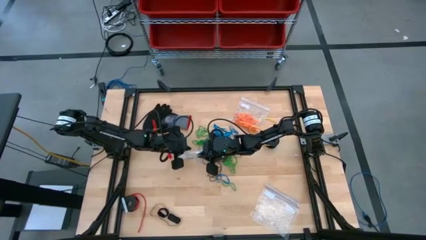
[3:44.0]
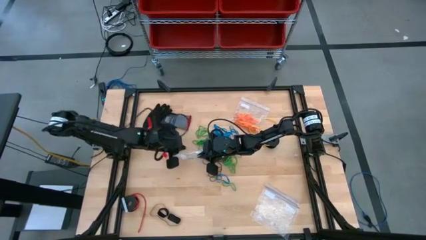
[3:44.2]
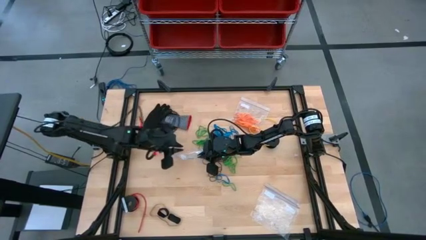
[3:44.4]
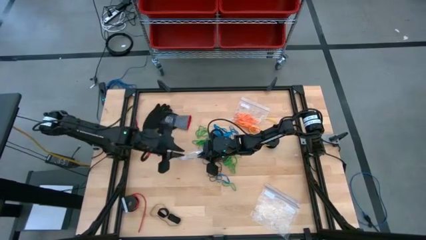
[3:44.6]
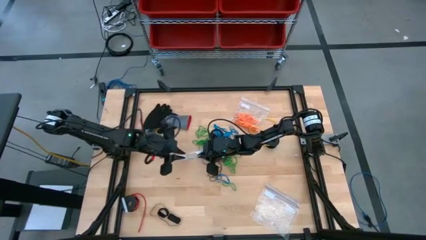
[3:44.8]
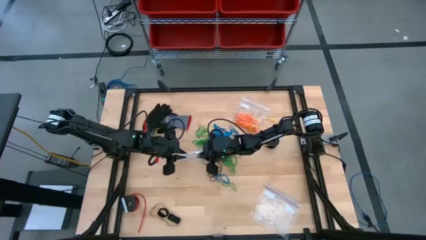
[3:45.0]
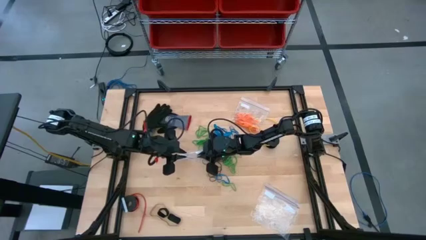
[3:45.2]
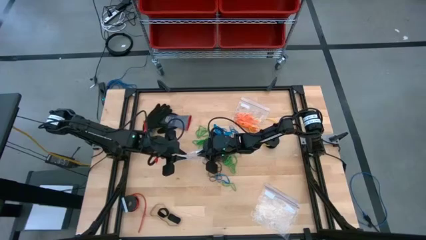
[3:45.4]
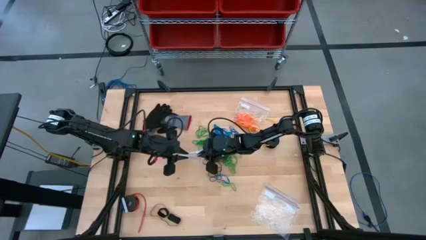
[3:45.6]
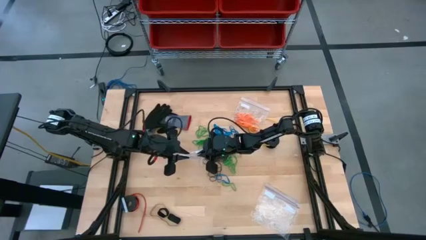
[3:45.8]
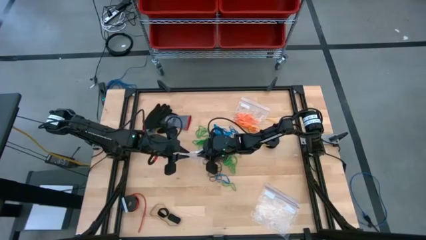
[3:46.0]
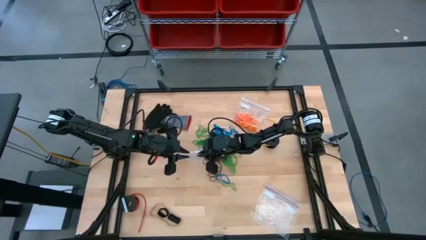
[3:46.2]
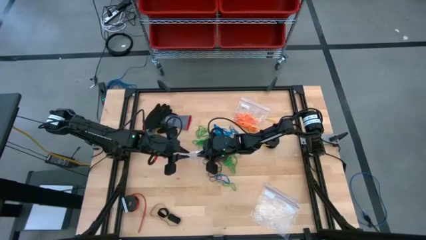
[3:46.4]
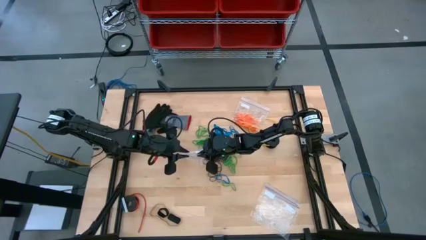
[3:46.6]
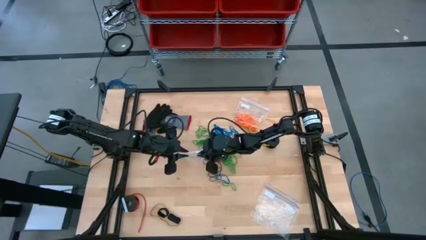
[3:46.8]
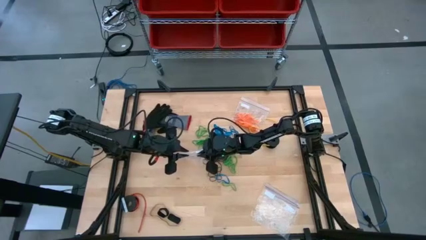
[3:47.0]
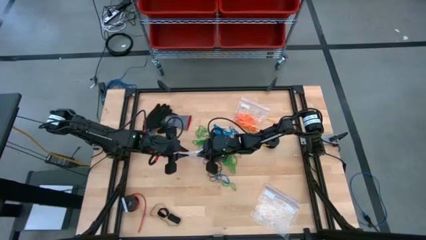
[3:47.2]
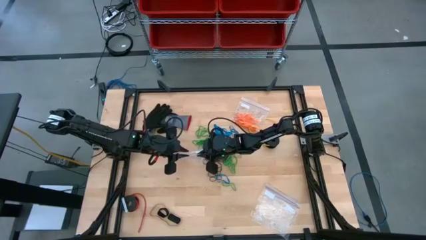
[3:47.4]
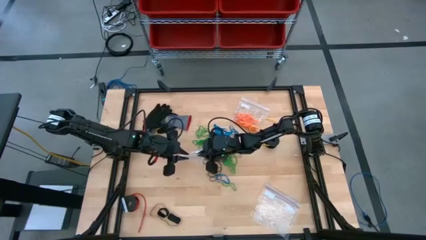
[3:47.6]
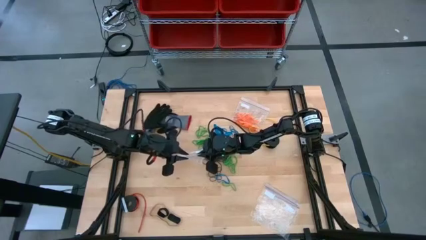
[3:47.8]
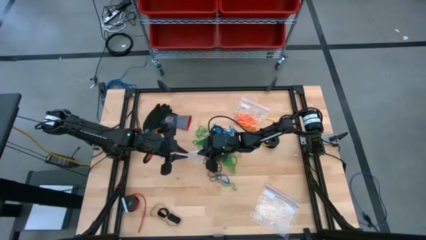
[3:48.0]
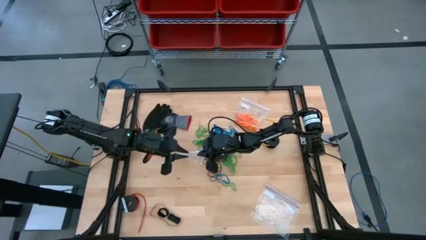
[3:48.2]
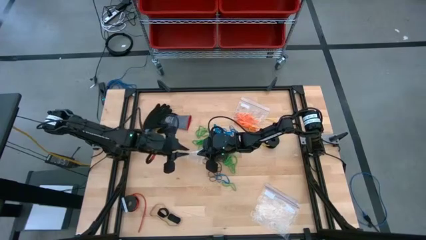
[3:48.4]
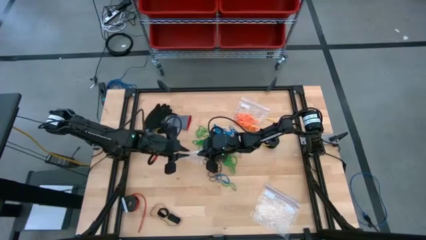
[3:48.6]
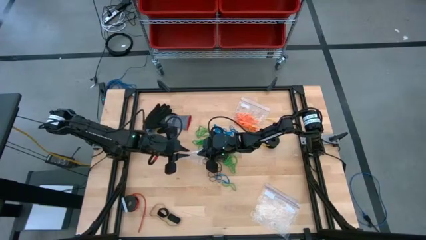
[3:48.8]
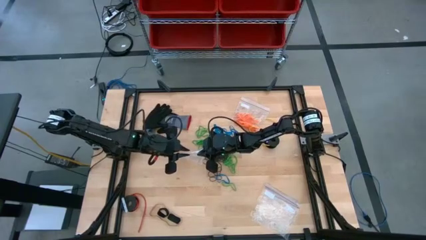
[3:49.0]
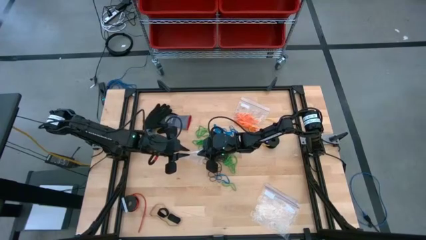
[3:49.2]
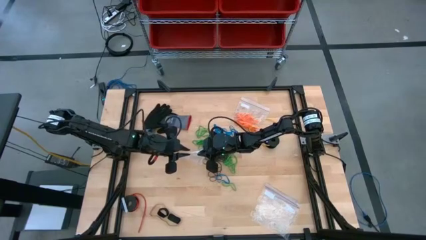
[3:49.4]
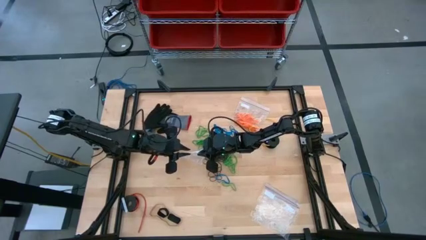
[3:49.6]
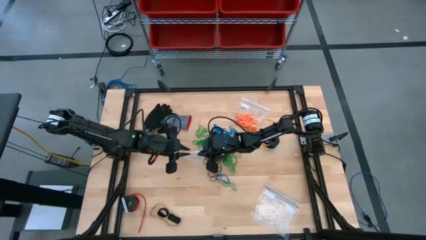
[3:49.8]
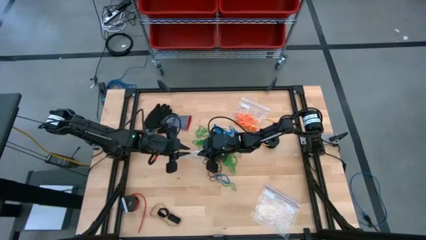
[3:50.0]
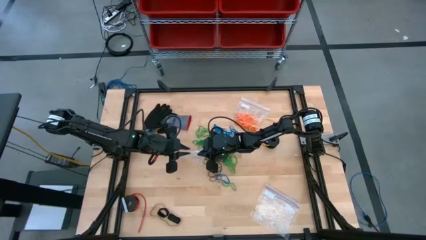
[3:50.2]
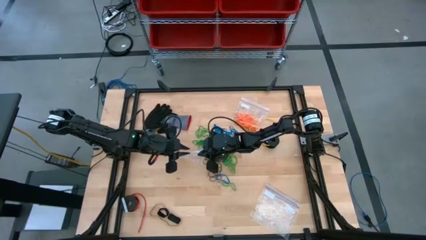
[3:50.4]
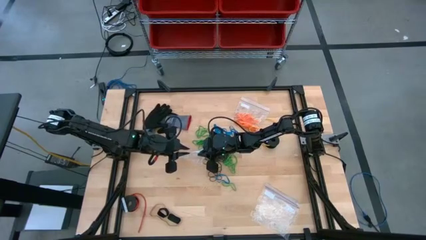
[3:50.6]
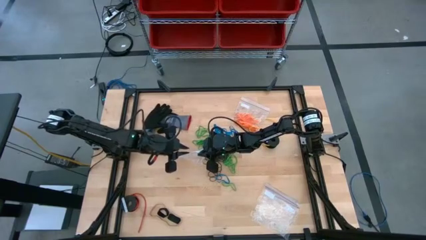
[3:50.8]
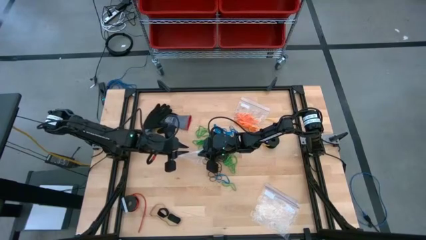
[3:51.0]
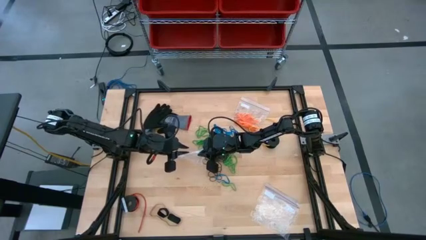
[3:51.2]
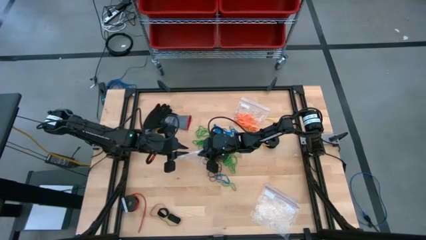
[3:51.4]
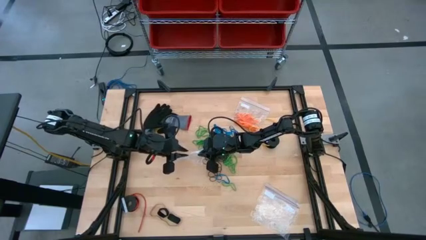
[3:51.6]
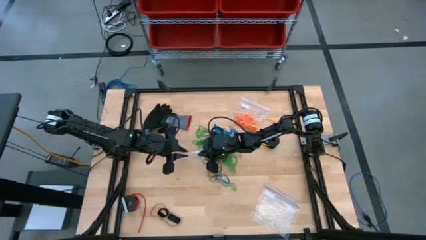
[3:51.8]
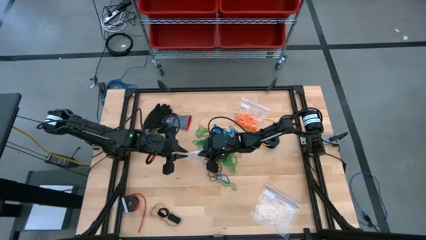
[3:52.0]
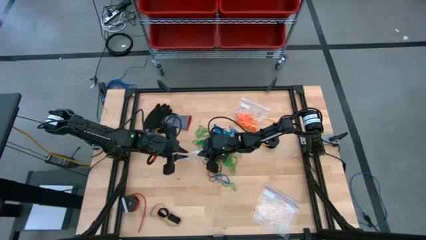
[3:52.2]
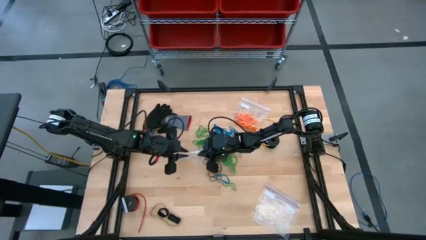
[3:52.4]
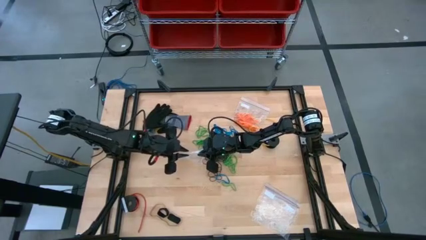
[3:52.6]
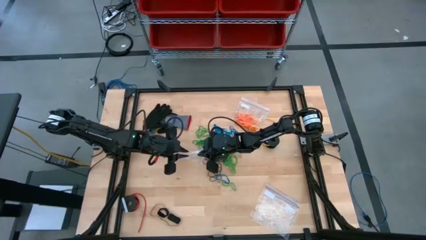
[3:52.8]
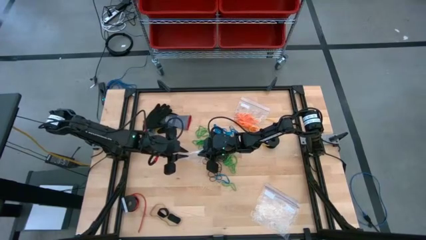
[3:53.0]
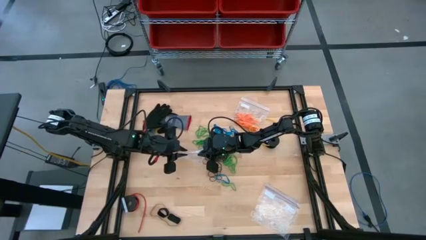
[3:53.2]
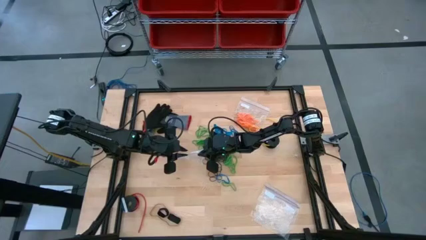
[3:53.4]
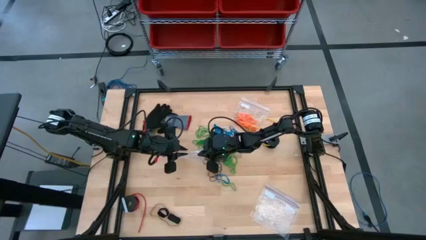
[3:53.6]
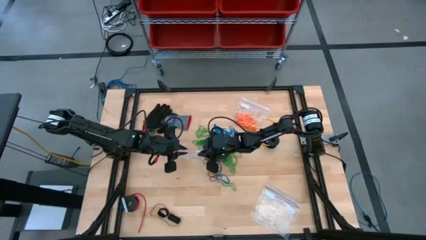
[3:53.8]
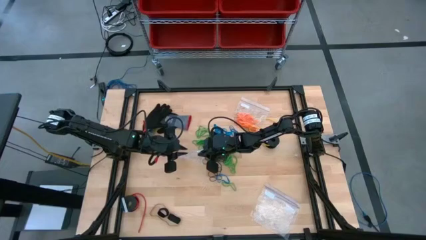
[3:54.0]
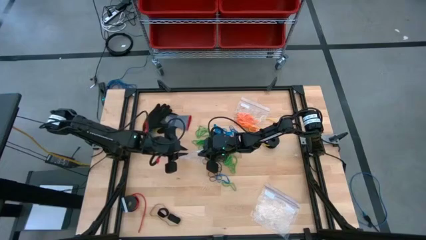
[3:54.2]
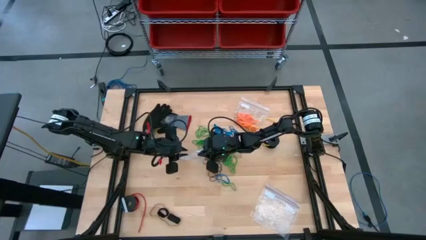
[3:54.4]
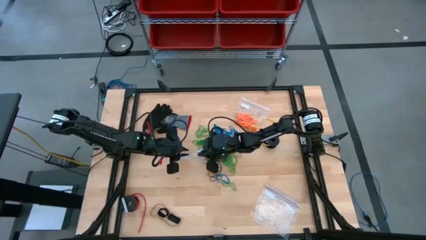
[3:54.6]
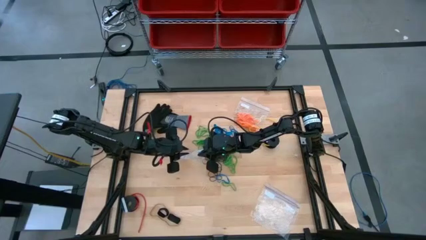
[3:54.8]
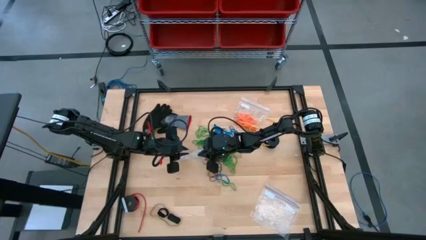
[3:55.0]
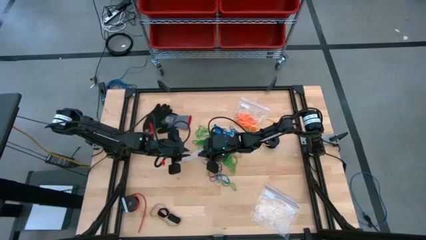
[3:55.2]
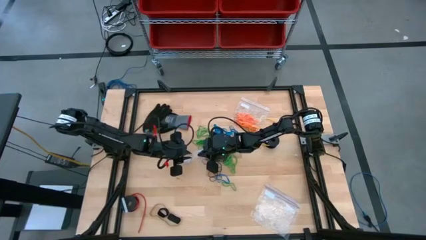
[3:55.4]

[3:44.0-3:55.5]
Task: Sort rubber bands
Open the transparent zip bag

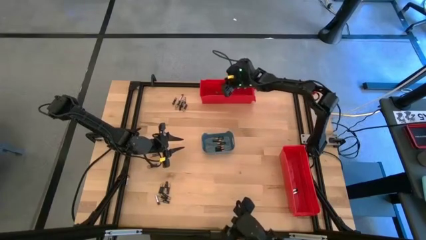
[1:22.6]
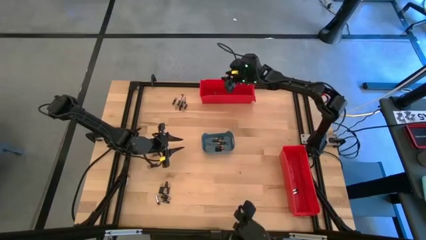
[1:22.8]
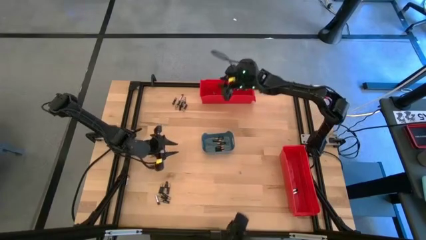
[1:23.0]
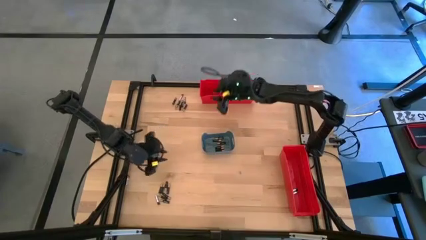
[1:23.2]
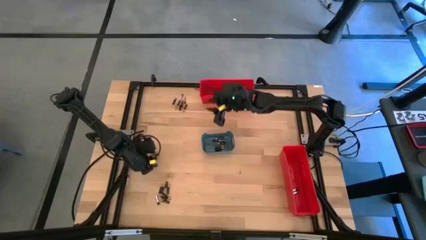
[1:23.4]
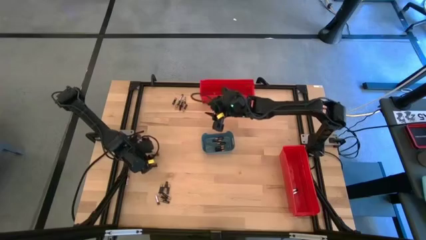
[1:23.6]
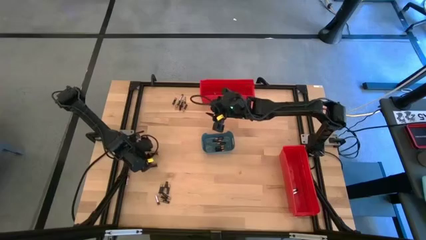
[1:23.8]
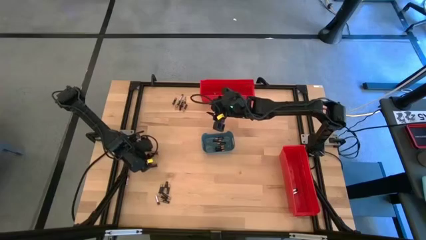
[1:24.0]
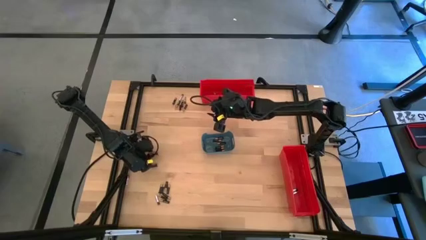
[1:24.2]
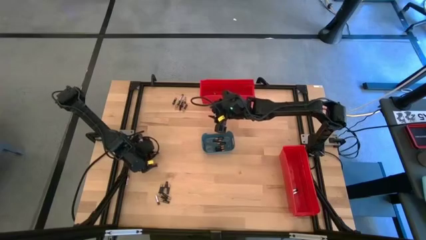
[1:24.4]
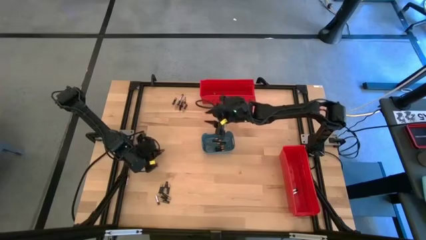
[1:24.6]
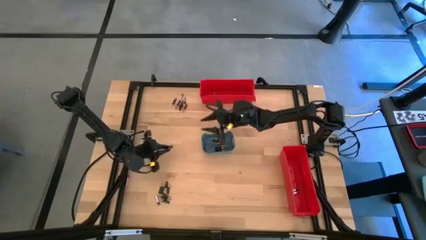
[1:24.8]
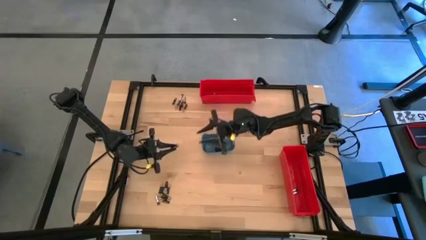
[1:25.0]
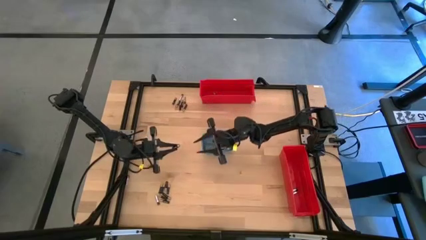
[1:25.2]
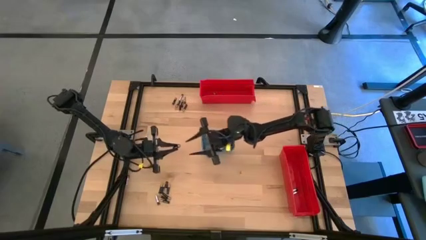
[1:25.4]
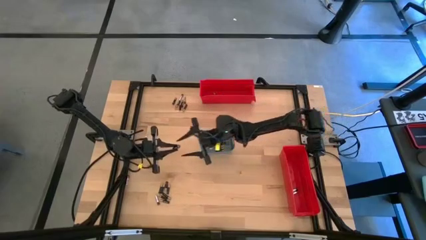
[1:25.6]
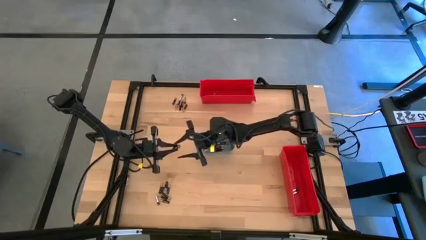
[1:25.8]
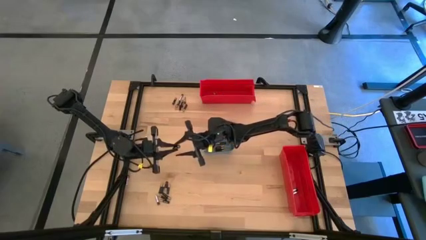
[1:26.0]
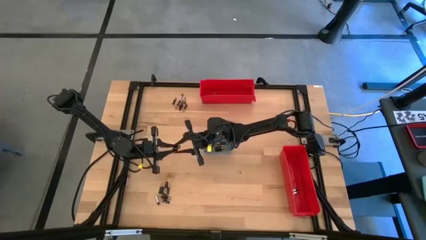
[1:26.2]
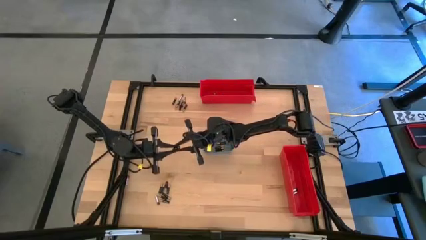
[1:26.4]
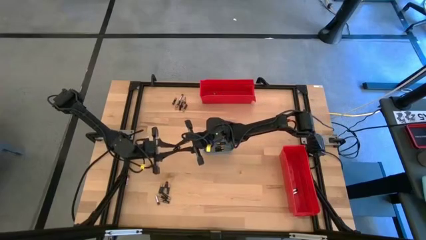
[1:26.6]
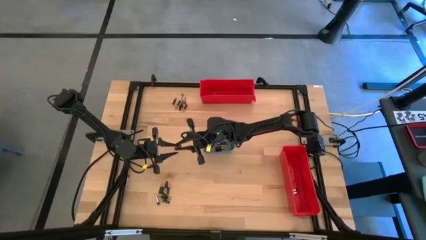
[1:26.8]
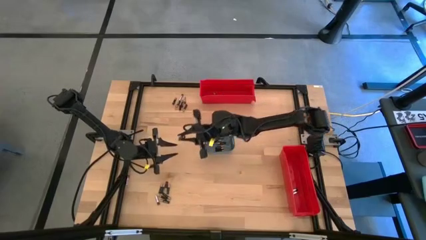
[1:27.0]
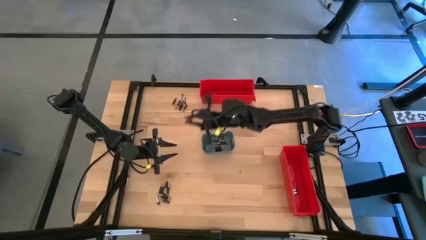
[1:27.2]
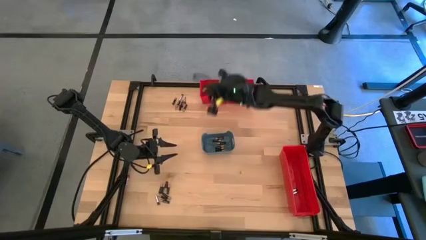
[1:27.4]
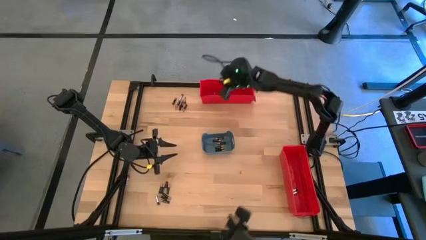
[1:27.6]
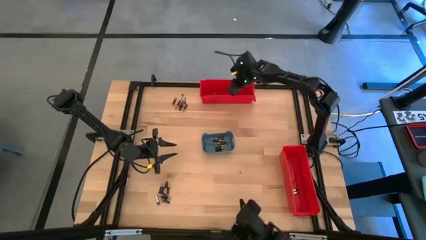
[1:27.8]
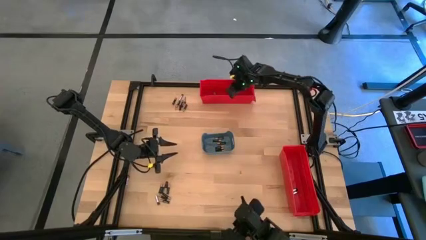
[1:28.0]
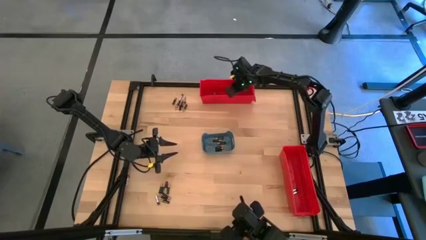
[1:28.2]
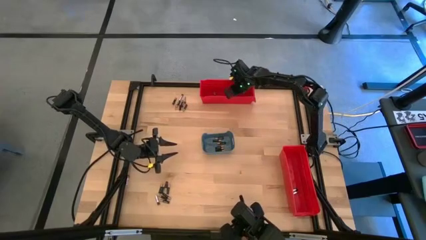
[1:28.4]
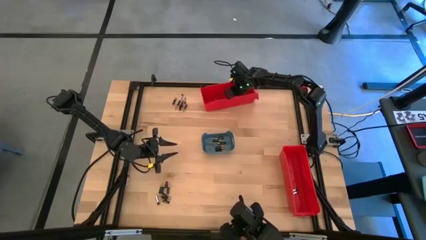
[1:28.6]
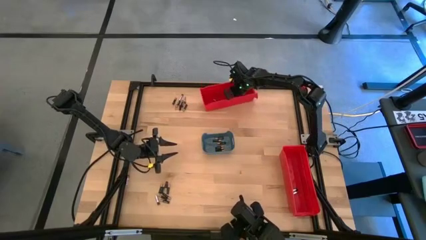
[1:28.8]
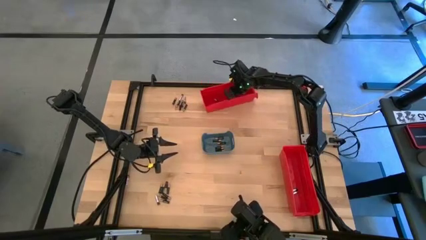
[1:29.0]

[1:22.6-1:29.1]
Task: Sort batteries
Put the black battery into the top red bin
